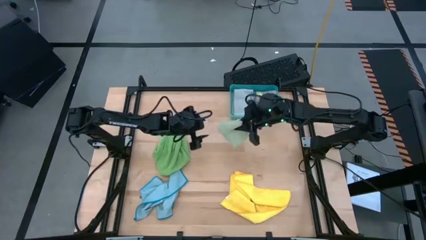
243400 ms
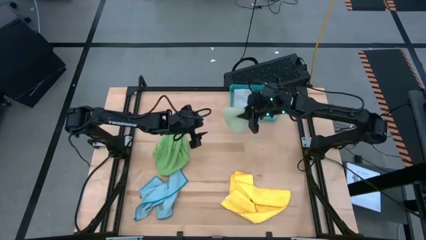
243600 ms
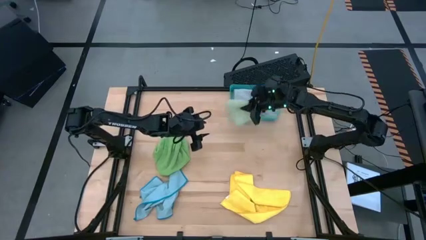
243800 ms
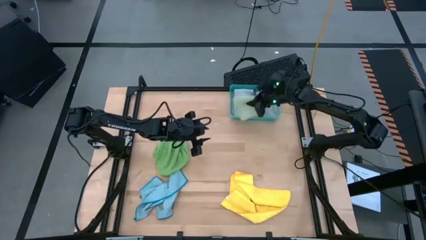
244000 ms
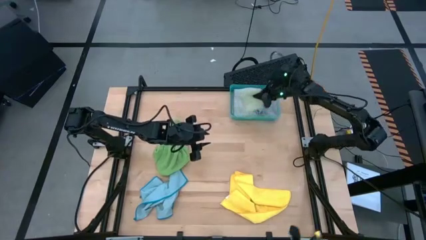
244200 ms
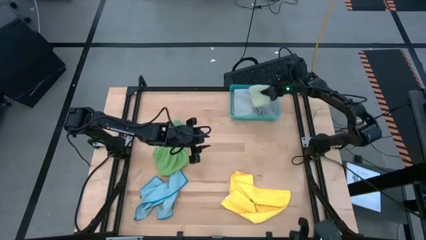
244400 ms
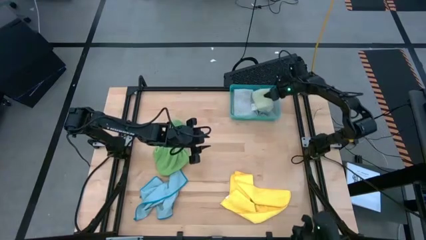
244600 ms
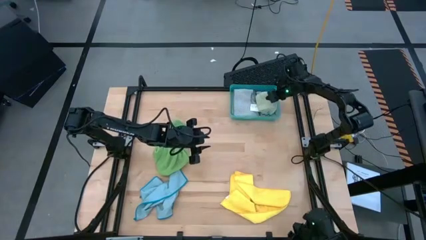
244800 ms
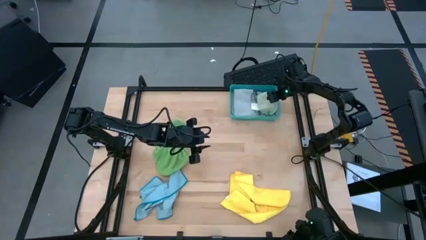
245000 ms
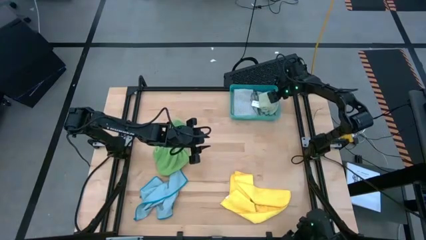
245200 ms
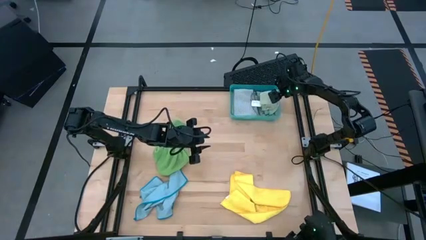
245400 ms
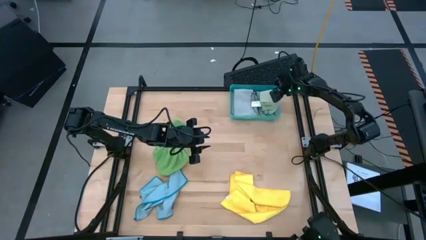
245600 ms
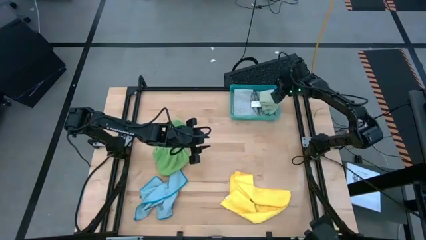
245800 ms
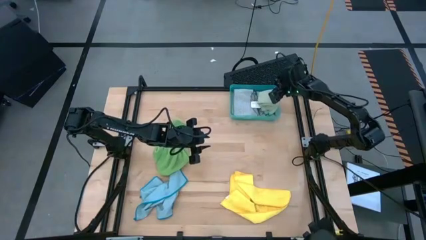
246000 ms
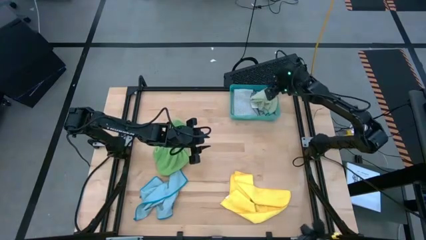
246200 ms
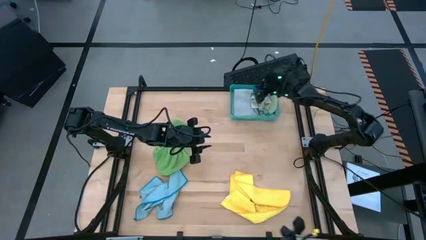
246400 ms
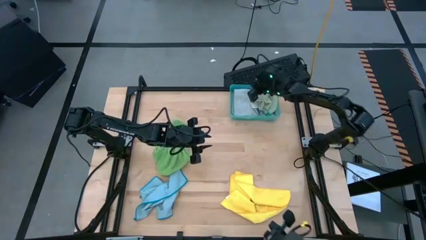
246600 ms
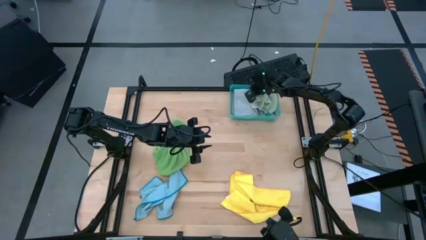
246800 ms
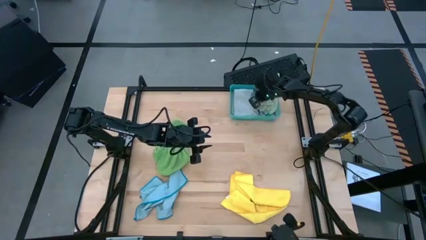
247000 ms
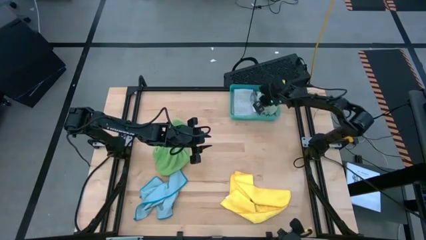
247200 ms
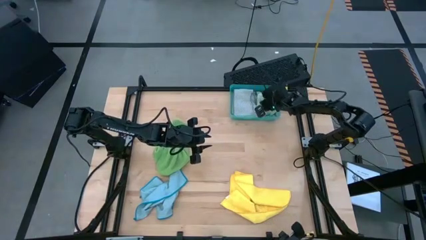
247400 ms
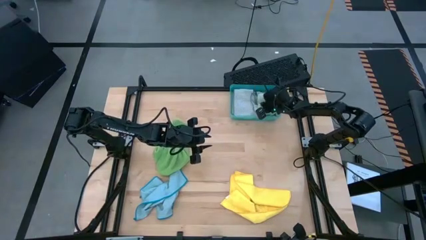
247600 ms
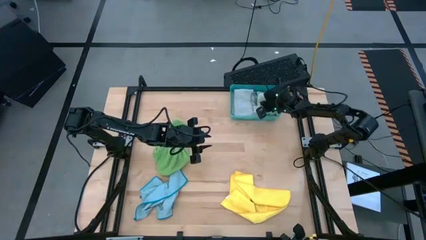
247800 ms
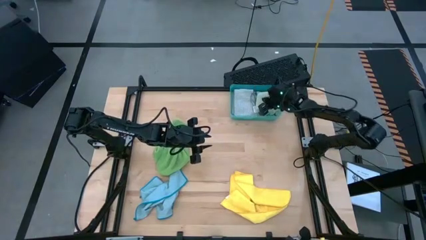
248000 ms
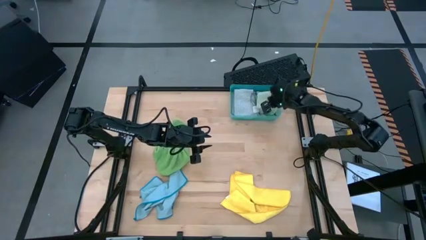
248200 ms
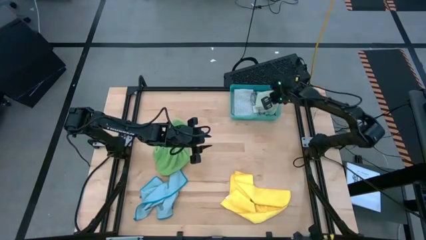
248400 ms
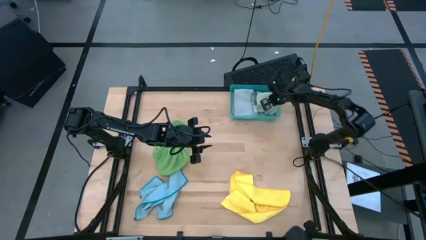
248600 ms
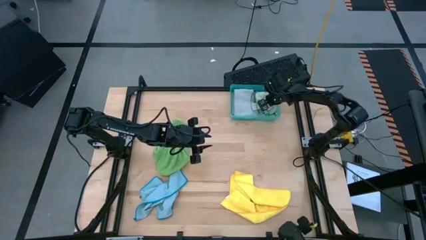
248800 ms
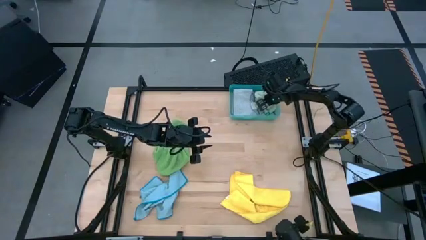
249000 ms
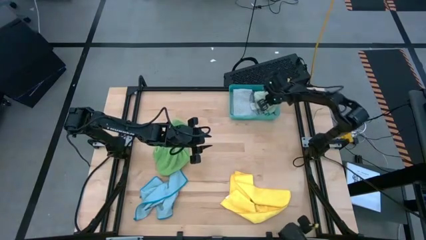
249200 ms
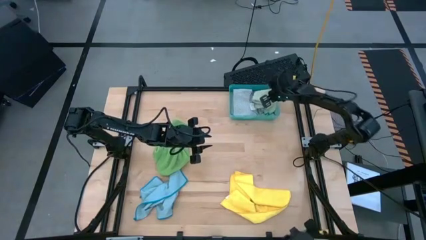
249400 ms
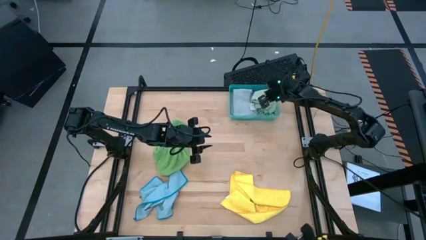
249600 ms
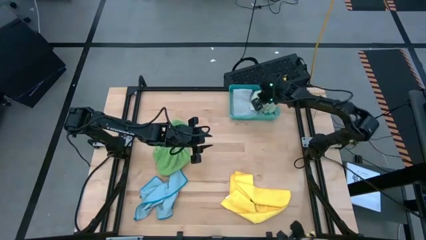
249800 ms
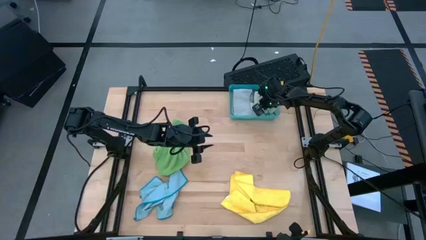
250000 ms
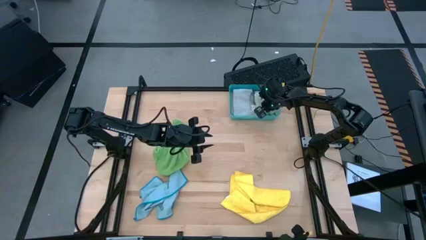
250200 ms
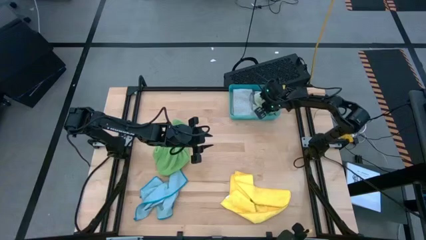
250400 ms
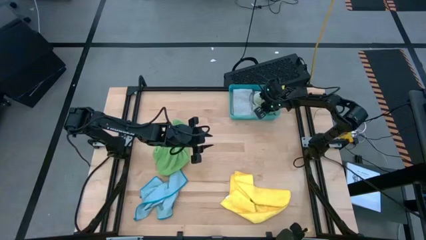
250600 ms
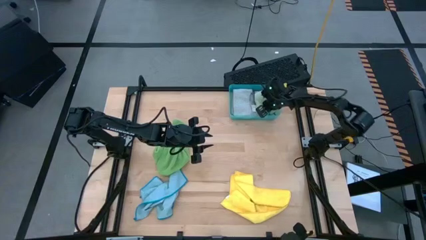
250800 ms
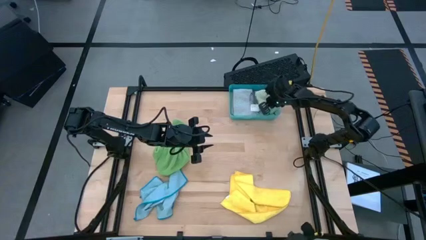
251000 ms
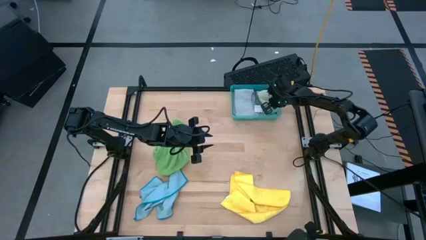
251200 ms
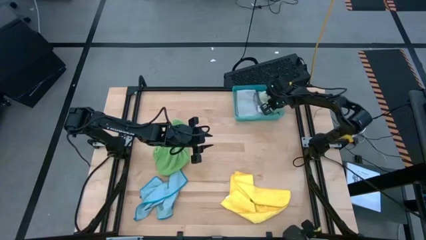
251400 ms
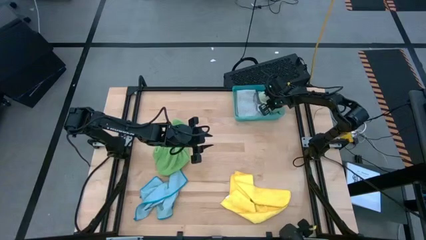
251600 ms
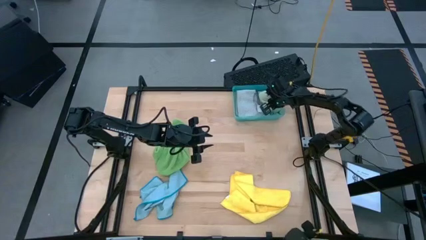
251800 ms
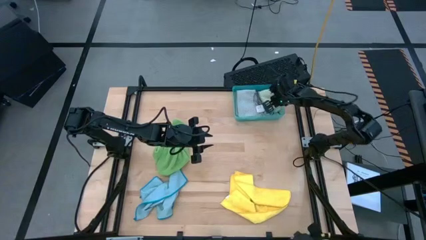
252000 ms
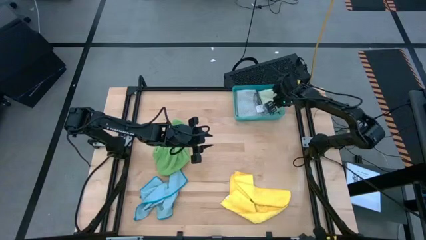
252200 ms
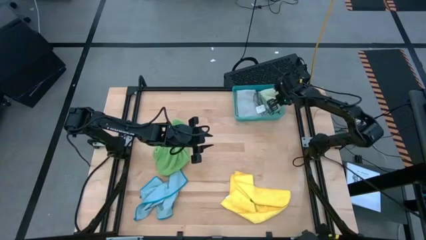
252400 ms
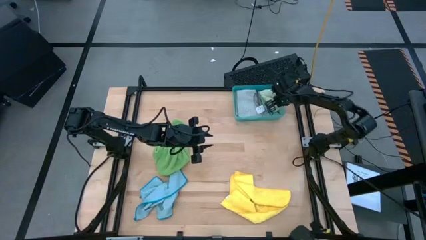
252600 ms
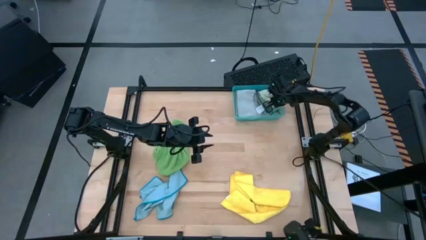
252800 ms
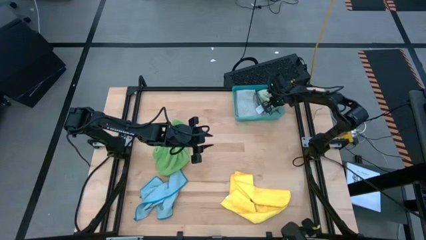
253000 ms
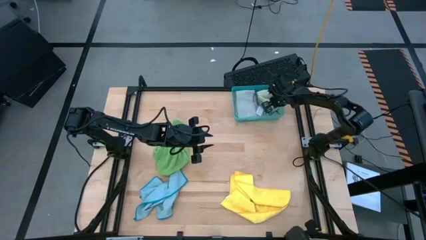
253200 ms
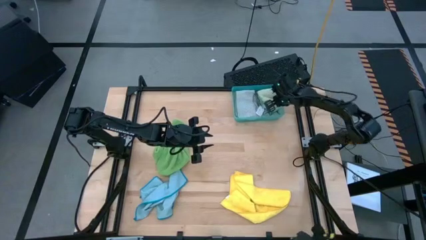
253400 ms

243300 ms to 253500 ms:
Task: Fold microfiber towels
Put the folded light green microfiber cloth into the bin

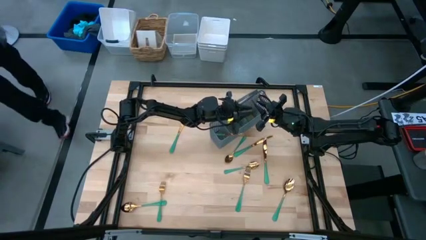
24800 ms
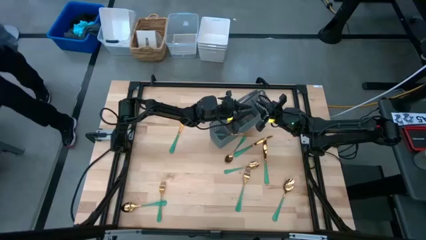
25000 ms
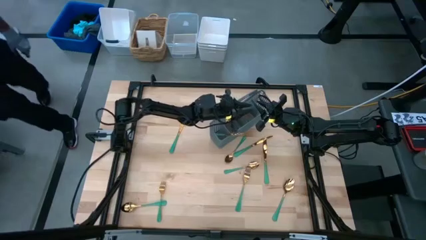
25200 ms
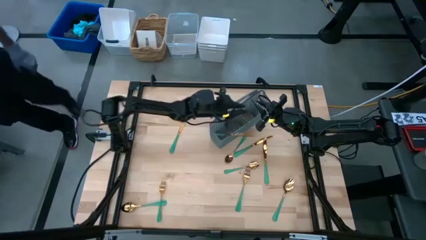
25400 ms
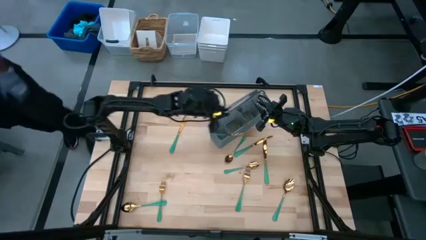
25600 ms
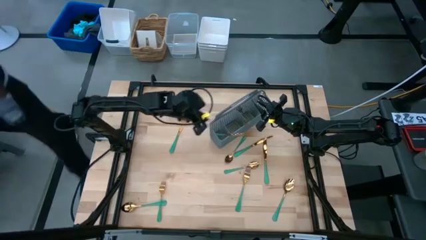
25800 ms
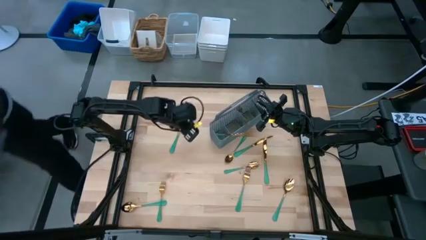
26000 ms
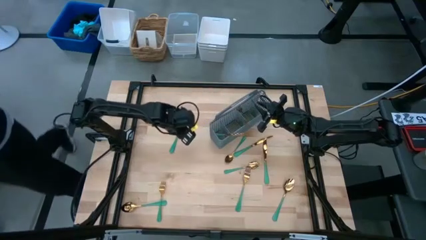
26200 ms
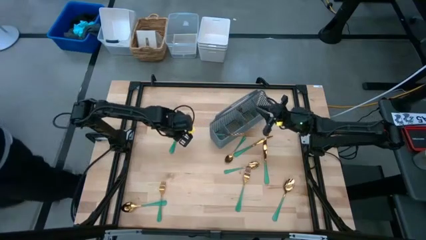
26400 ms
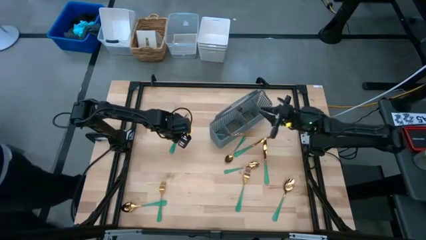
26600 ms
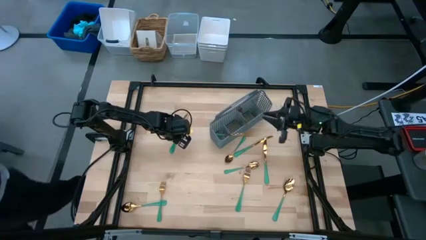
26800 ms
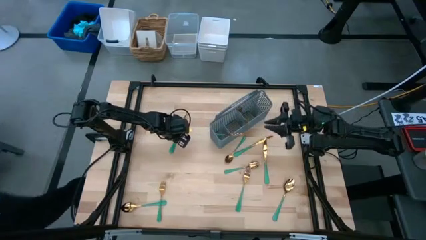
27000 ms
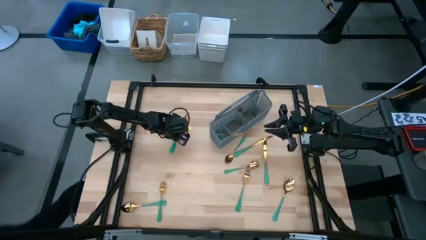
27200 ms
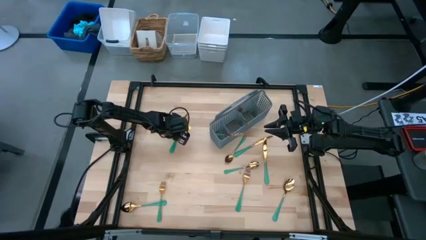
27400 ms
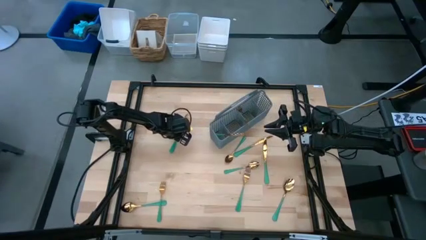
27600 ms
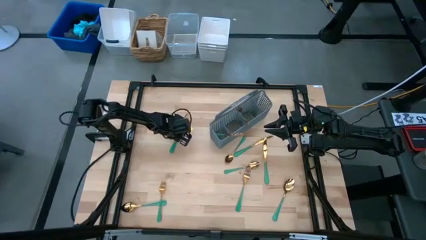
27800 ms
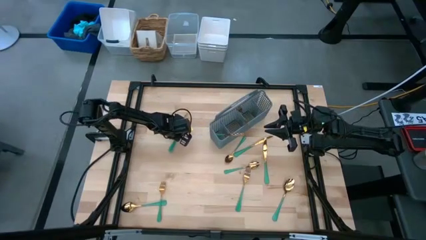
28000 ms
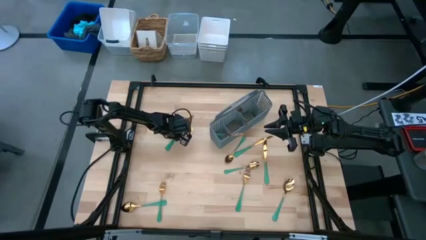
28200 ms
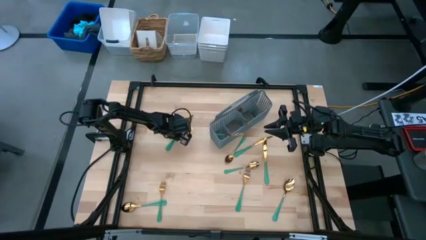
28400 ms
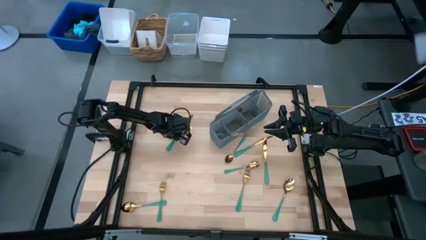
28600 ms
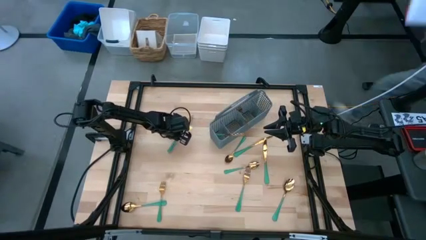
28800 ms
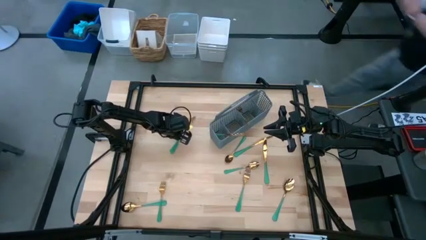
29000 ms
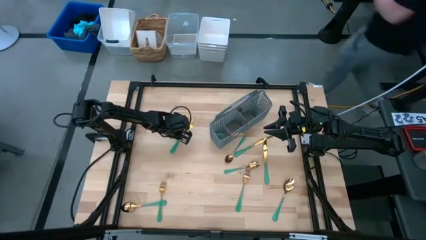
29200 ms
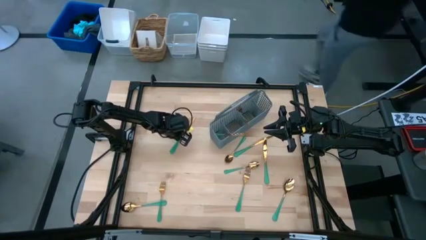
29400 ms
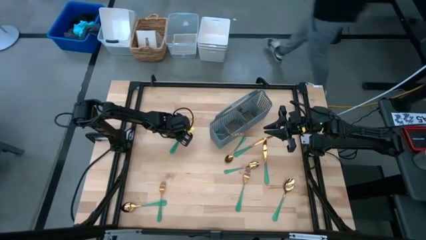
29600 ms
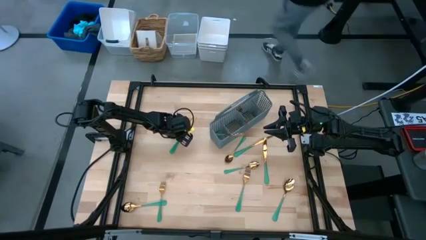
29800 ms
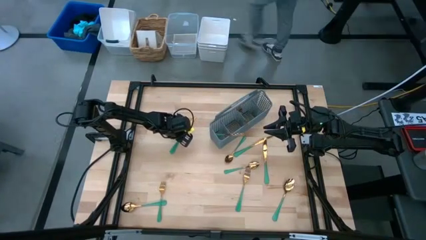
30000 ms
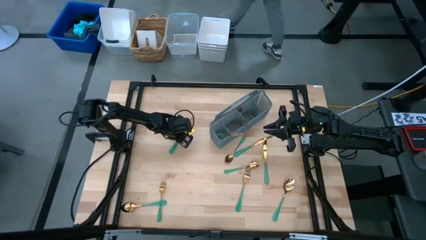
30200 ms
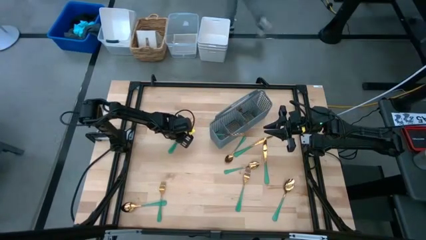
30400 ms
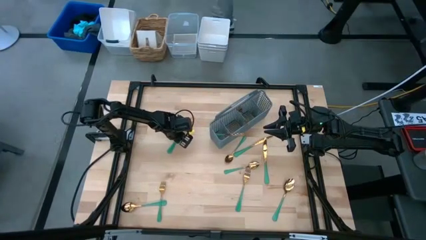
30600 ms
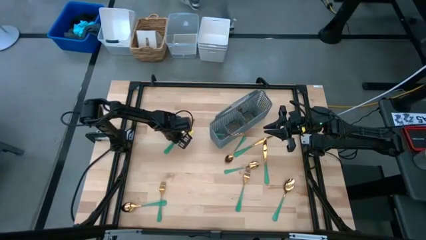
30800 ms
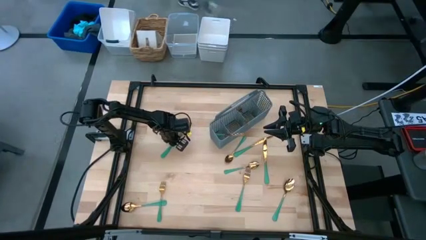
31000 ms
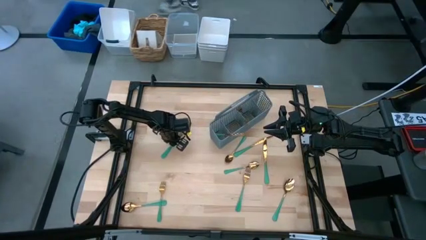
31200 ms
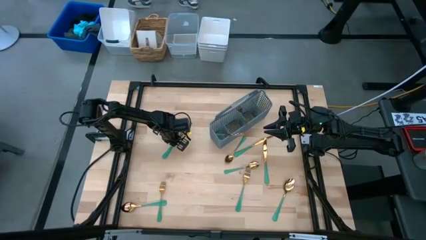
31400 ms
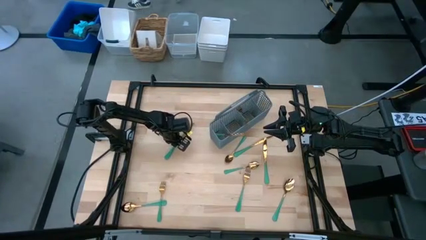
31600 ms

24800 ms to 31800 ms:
Task: Sort silverware
Put the left knife into the basket
